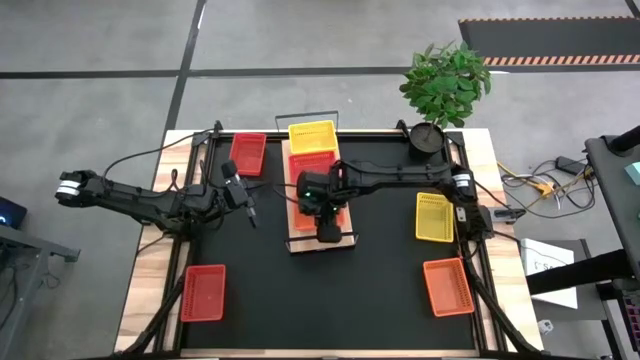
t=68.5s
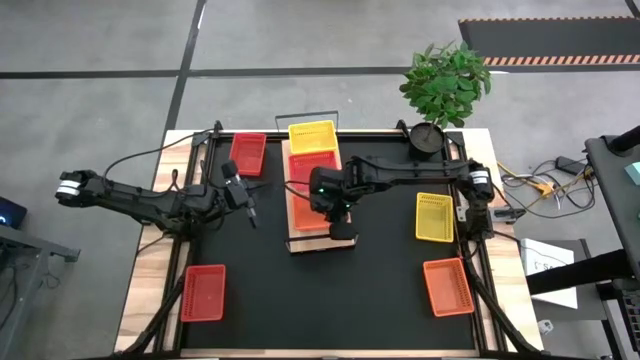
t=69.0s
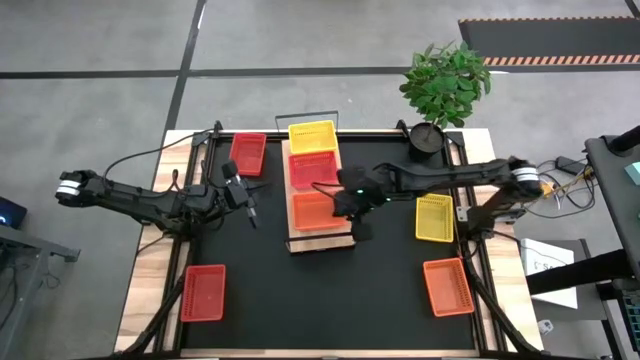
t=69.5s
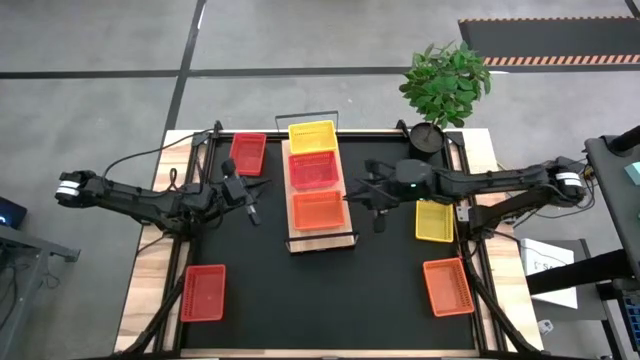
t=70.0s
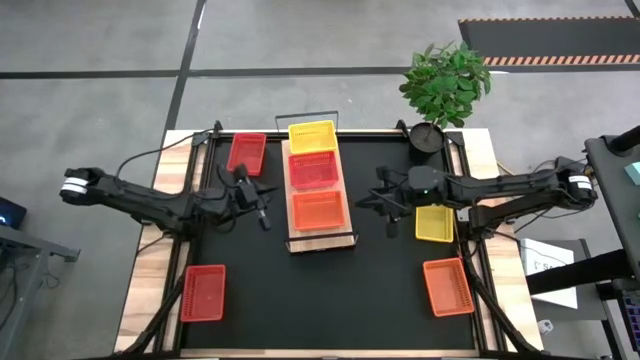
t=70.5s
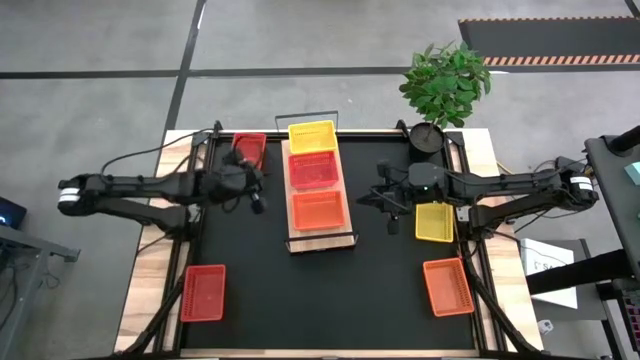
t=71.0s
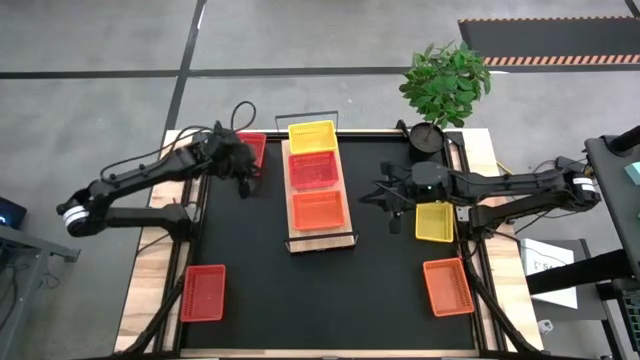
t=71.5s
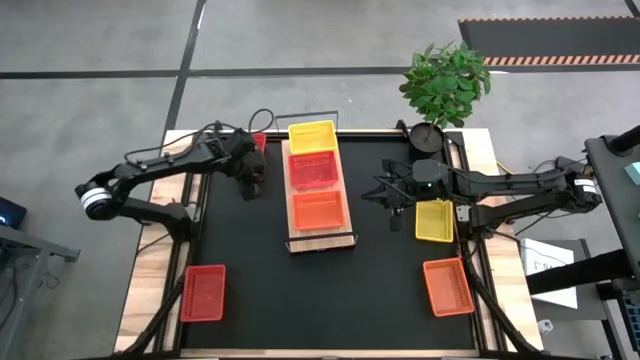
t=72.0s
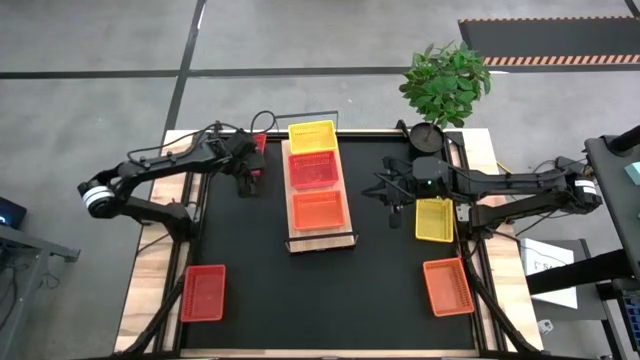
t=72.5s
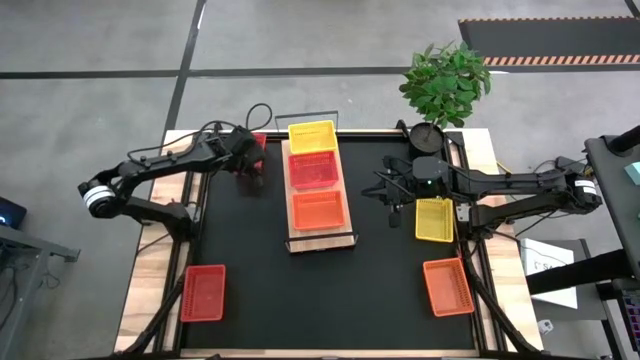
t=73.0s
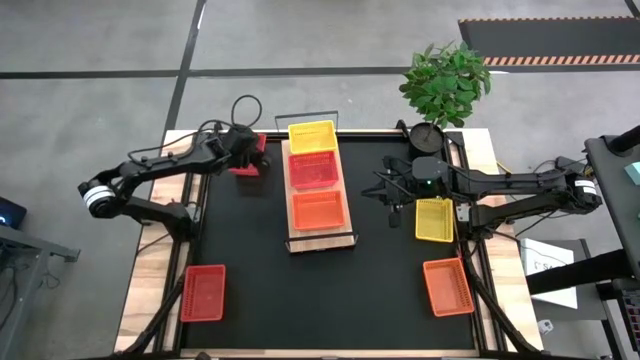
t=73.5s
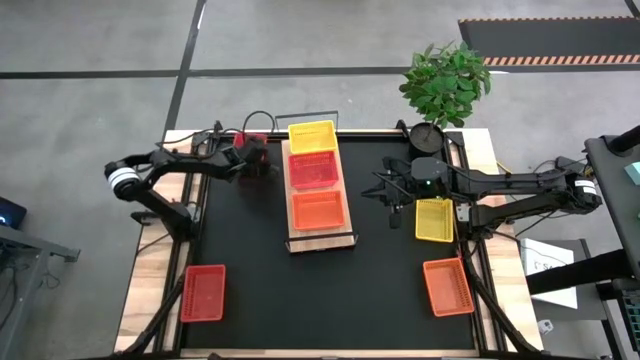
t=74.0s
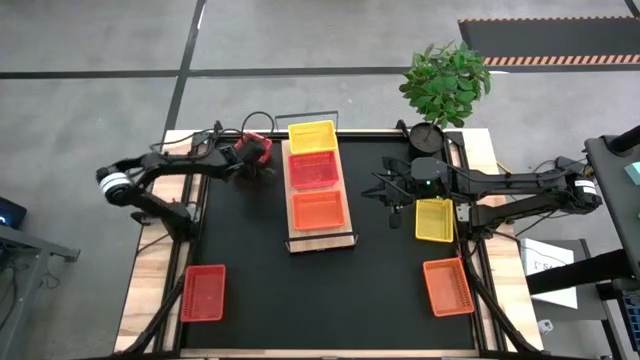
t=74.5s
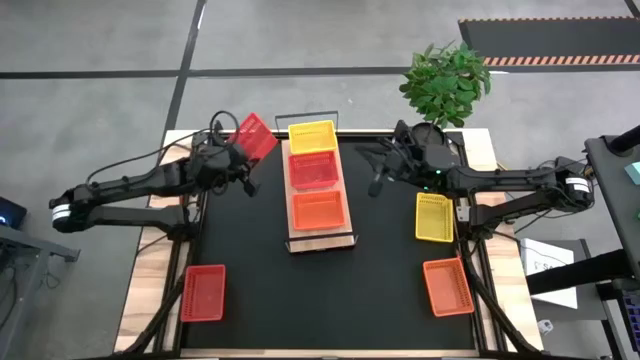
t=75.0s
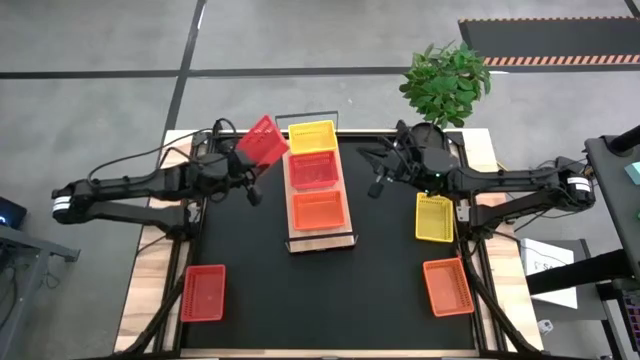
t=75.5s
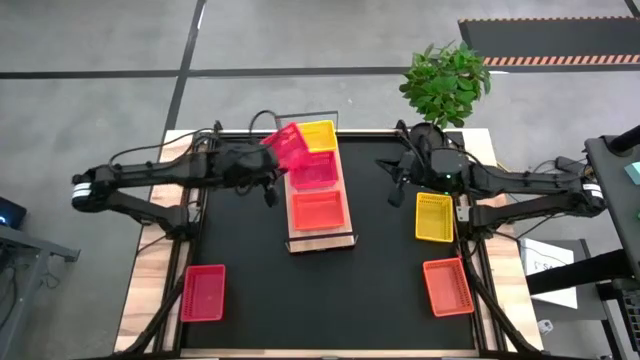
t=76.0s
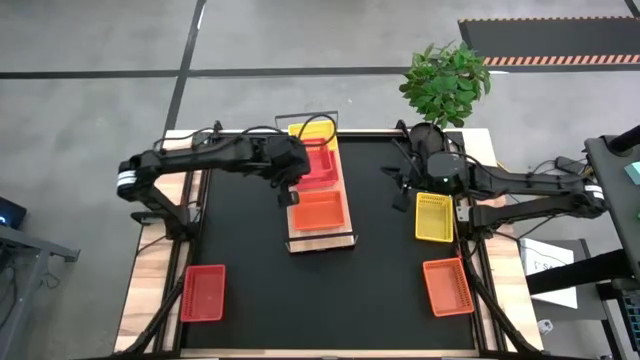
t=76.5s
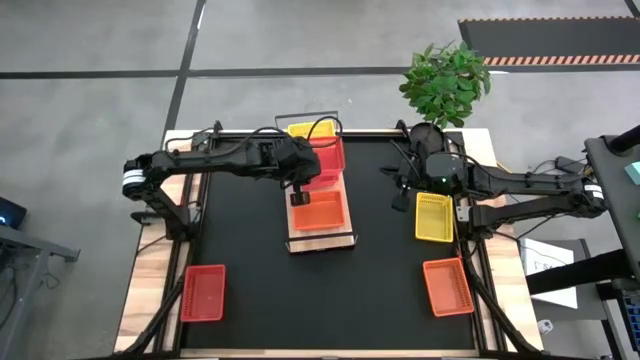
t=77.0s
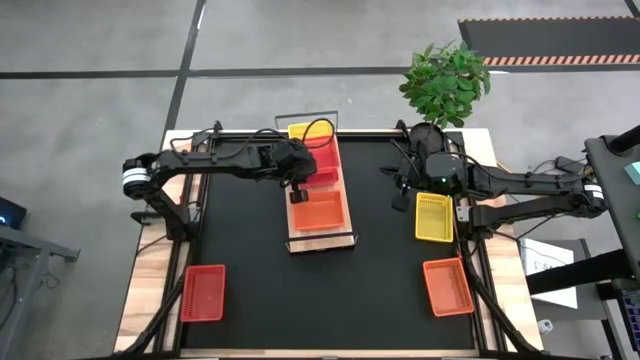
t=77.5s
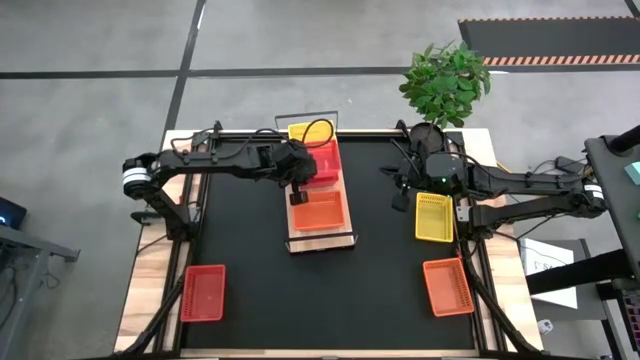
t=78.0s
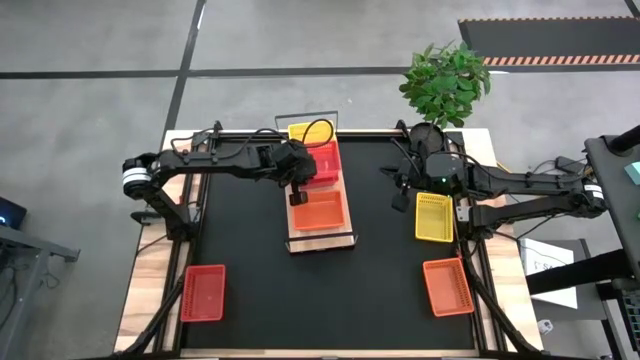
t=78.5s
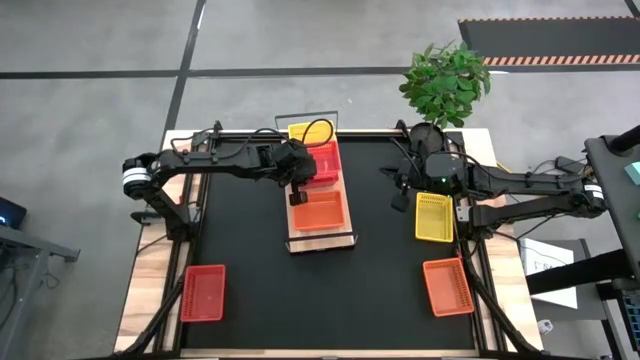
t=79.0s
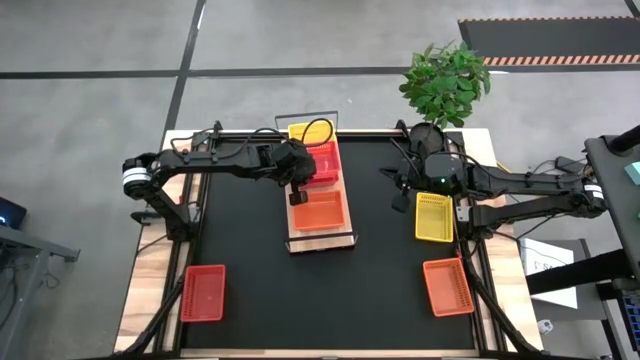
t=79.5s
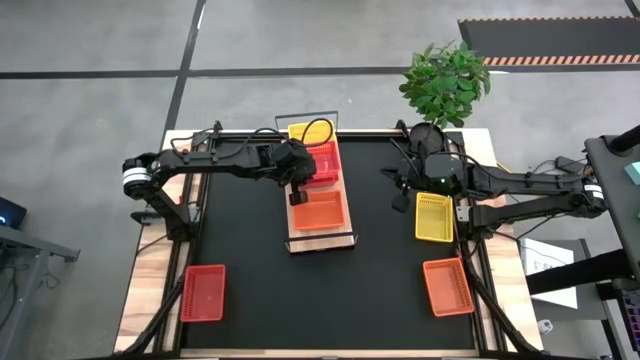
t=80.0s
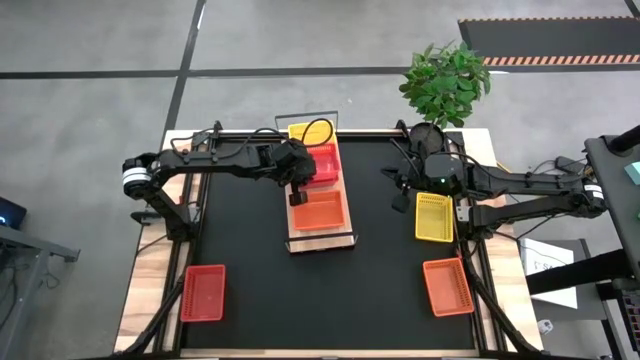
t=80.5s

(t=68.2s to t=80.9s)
Task: Stack baskets on shelf by color
Stack the top red bin on top of the stacked red bins on the shelf

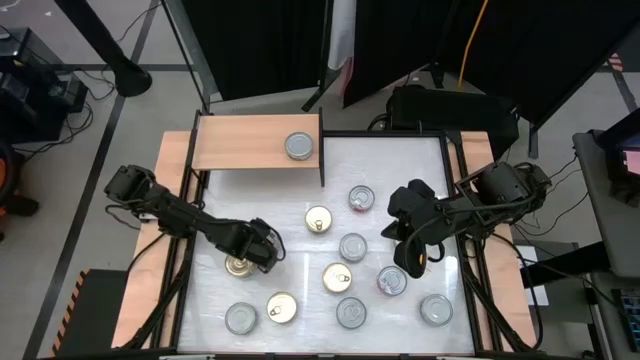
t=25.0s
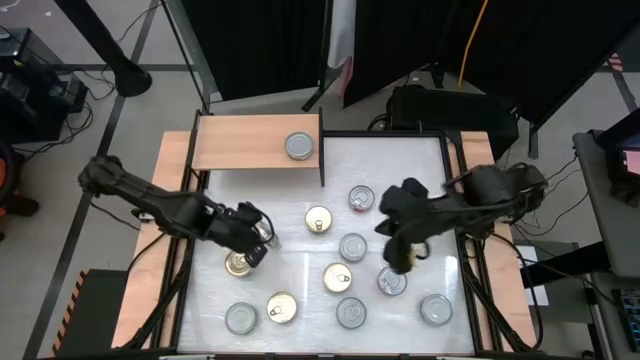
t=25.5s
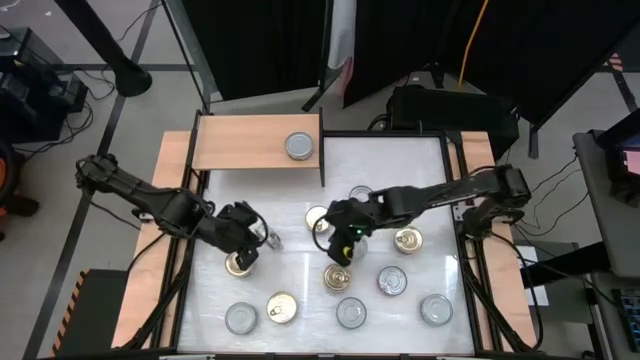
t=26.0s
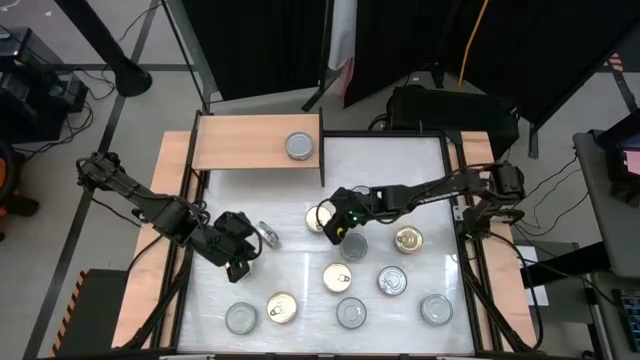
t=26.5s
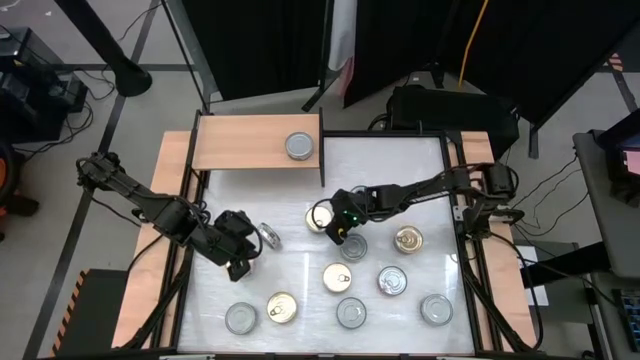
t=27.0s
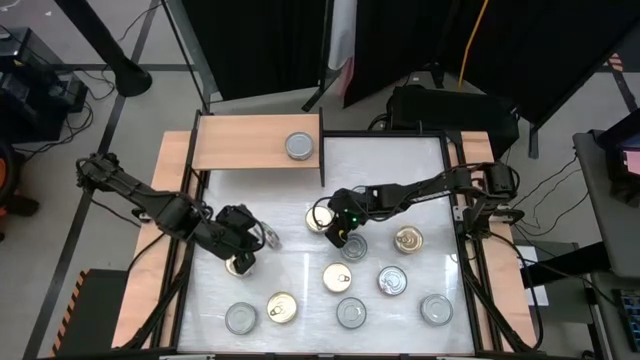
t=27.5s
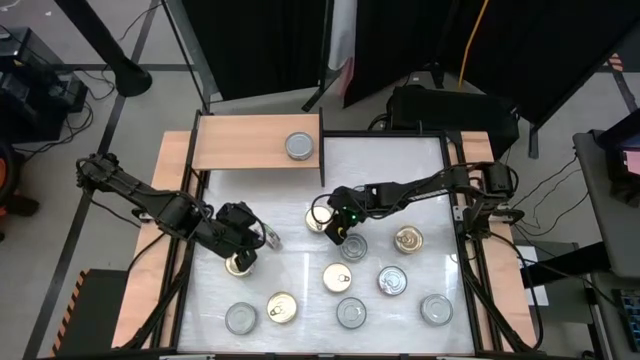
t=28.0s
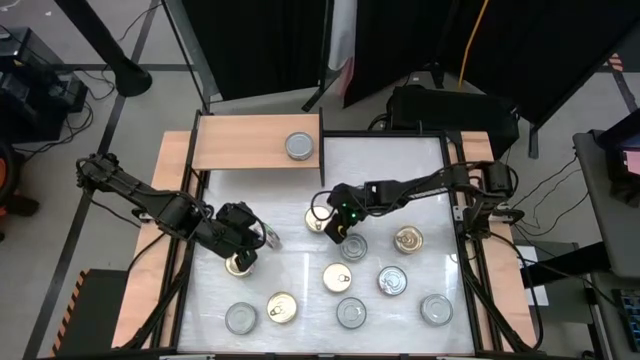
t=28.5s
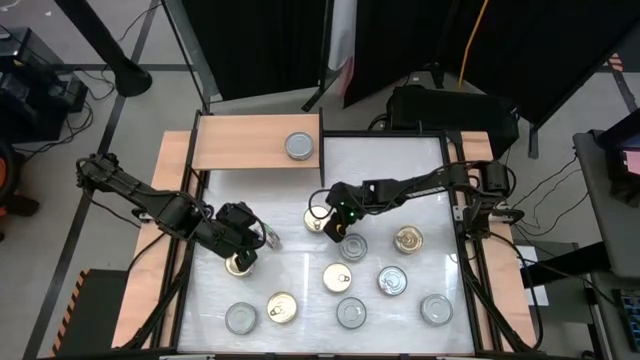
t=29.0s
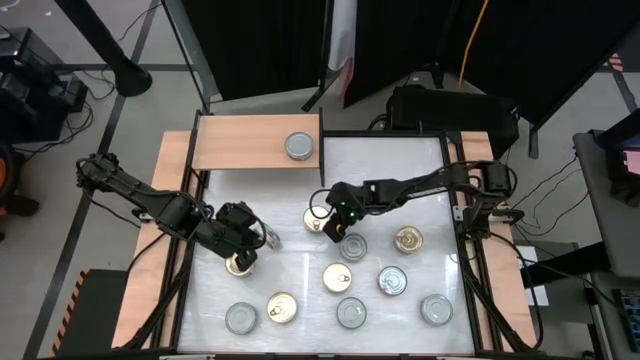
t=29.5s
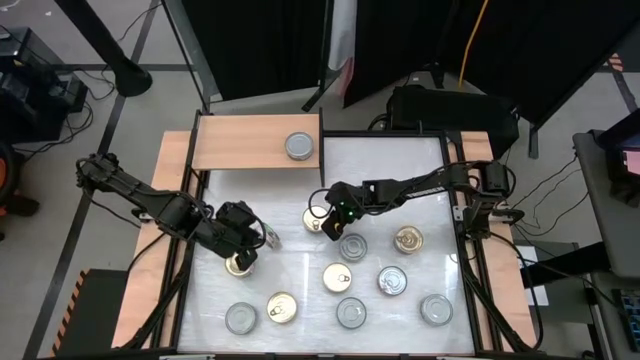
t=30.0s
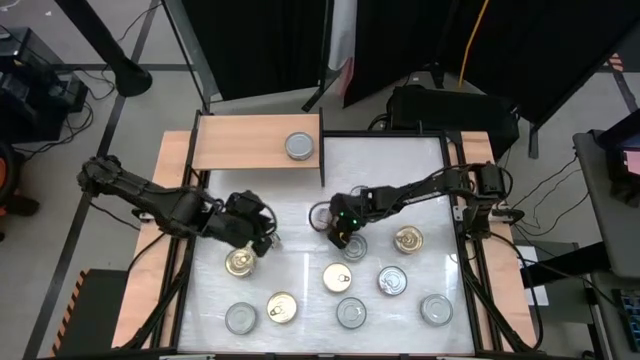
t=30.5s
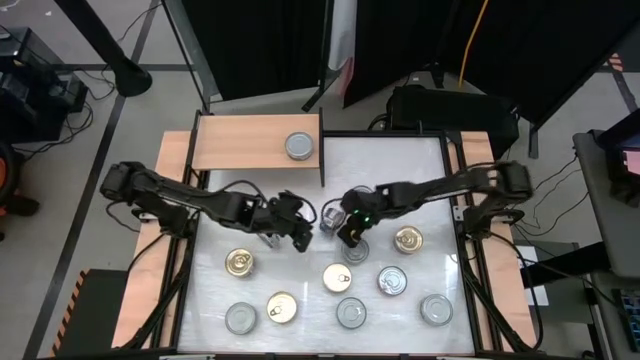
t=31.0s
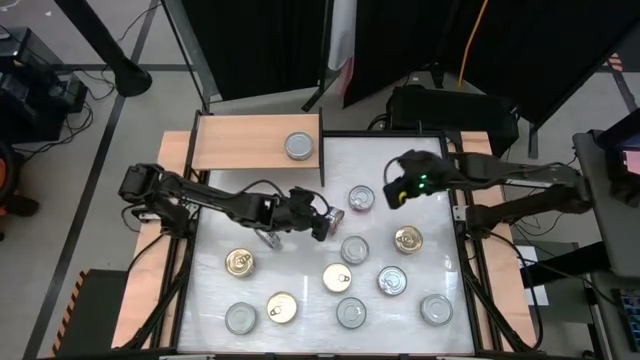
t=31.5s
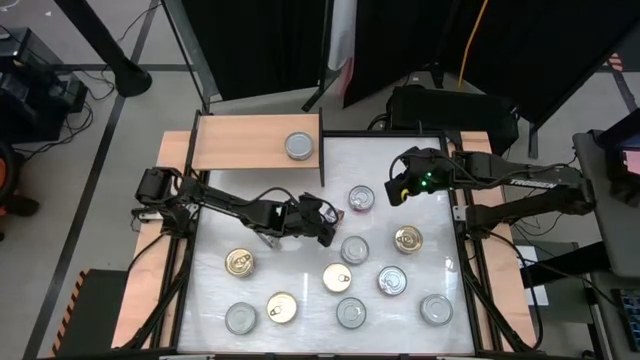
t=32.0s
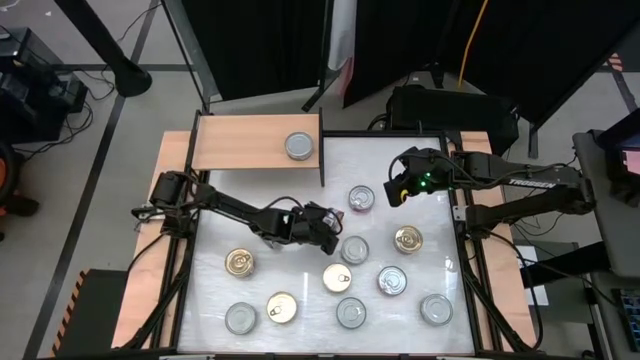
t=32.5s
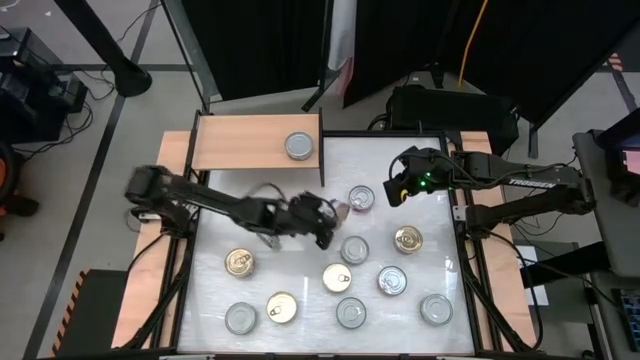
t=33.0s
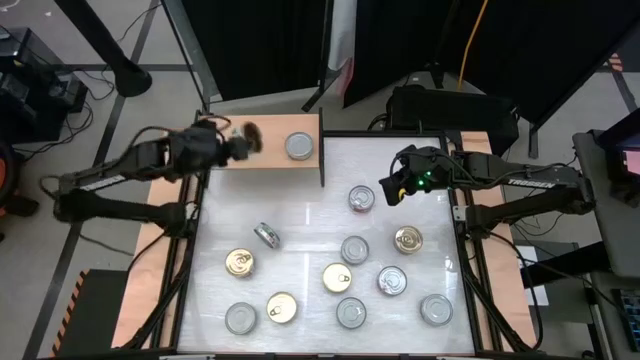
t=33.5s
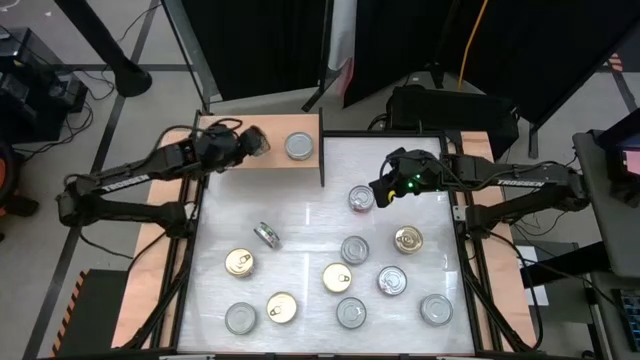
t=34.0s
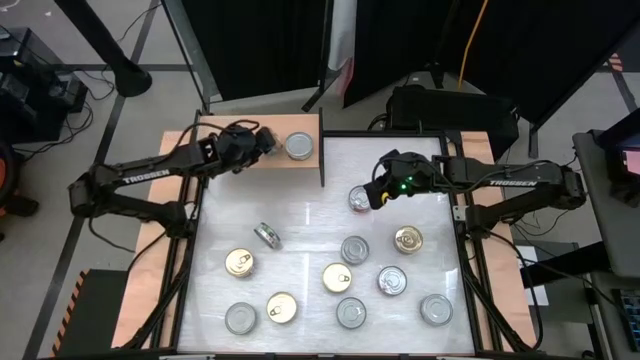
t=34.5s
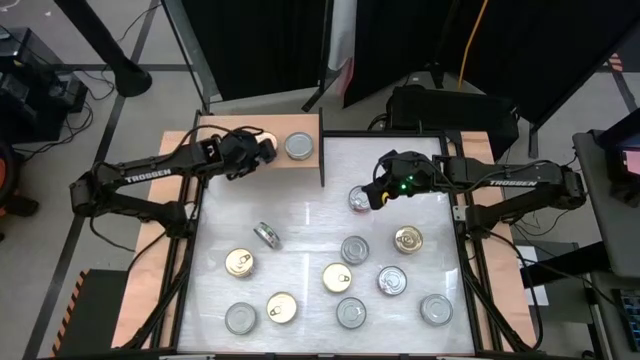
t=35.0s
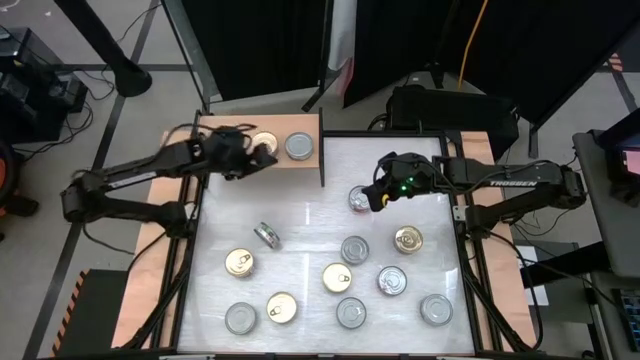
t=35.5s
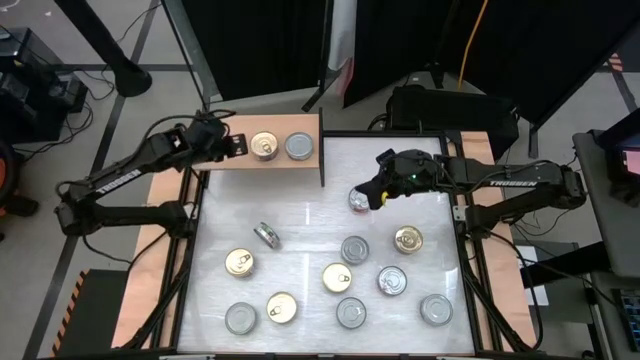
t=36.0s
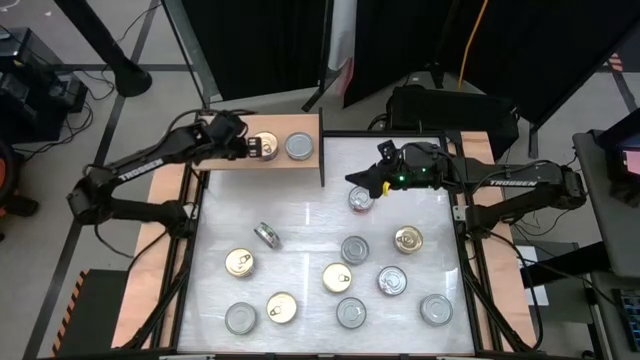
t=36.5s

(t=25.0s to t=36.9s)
Task: Stack canned seafood by type on shelf
Put the blue pink tuna can on the shelf
